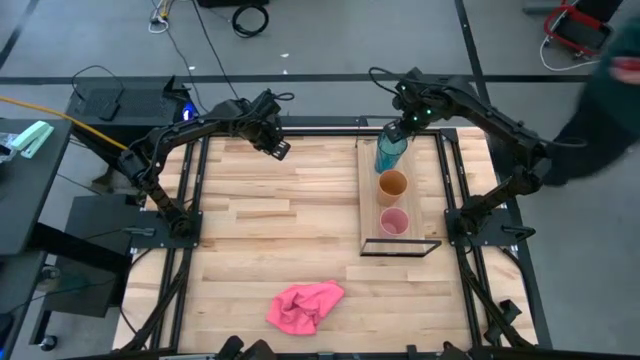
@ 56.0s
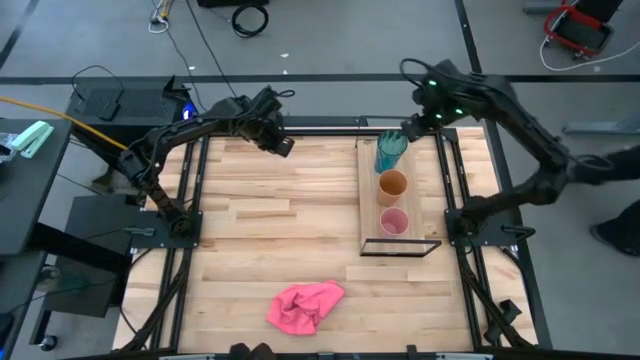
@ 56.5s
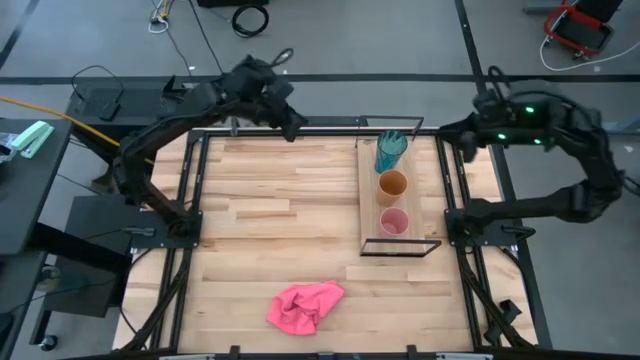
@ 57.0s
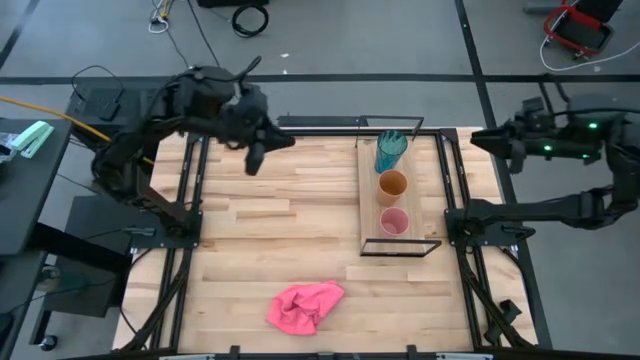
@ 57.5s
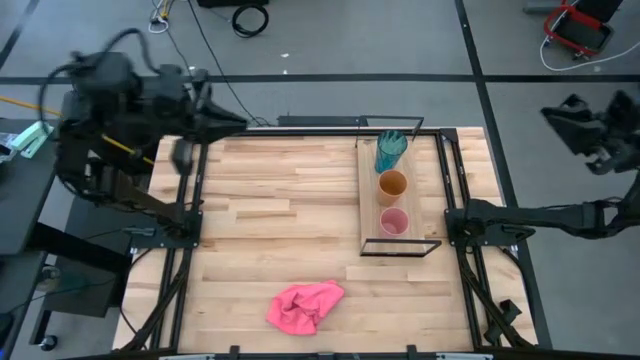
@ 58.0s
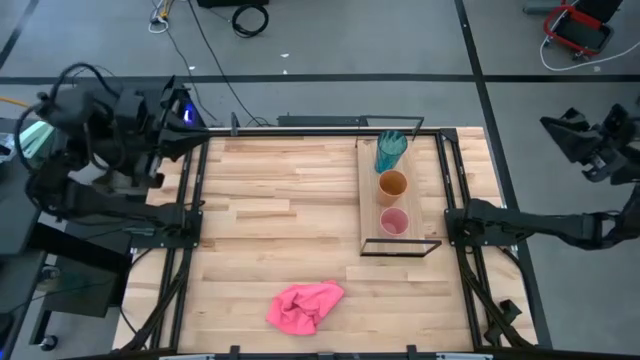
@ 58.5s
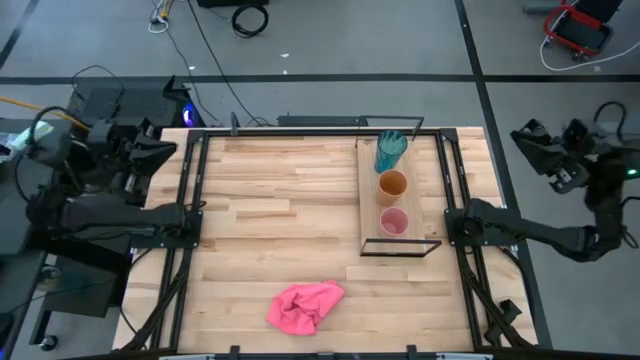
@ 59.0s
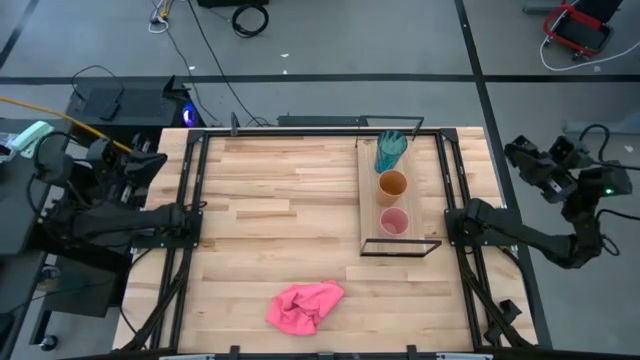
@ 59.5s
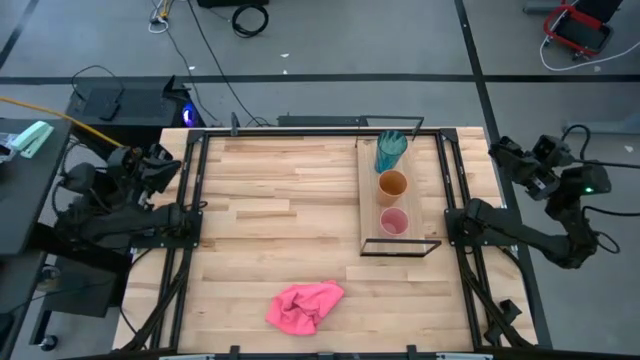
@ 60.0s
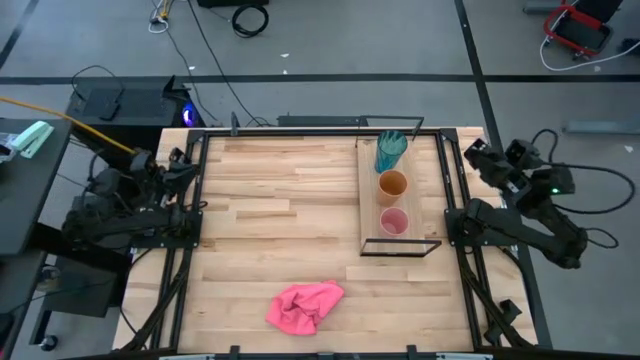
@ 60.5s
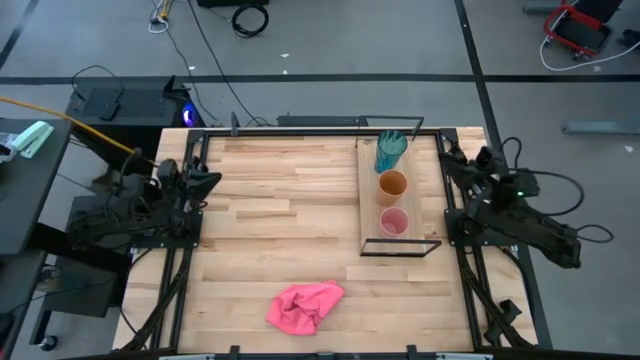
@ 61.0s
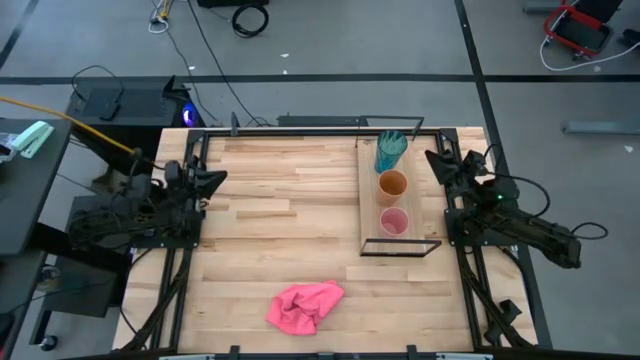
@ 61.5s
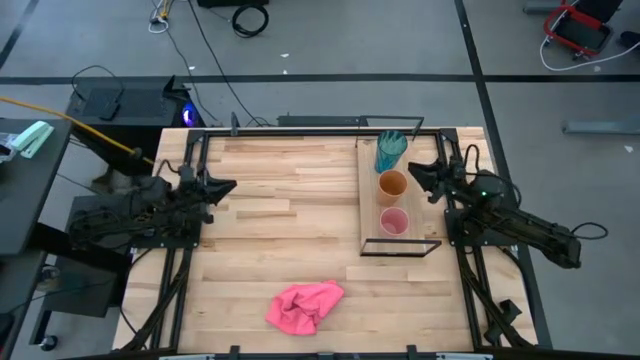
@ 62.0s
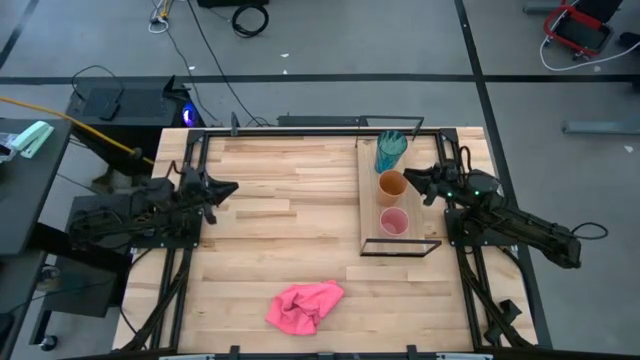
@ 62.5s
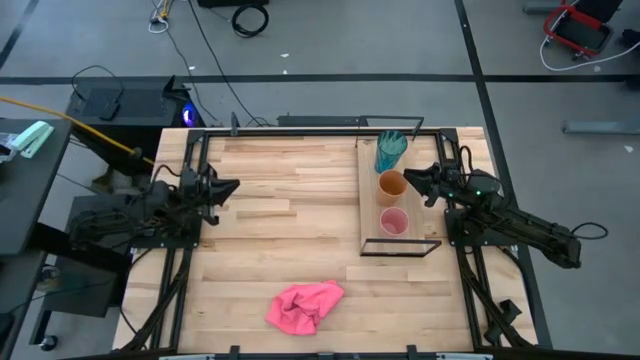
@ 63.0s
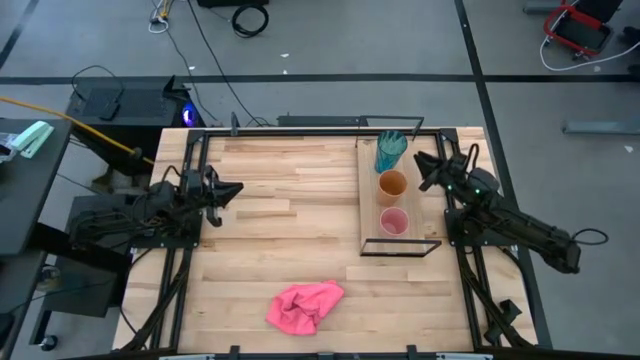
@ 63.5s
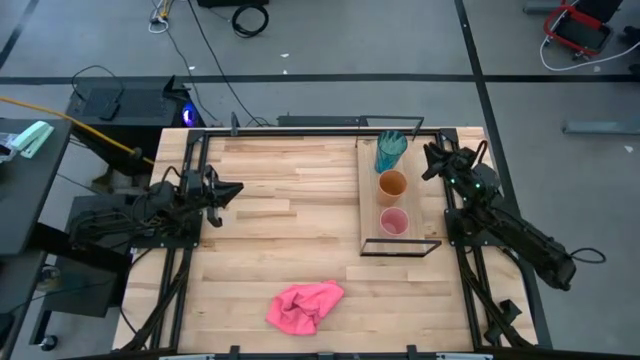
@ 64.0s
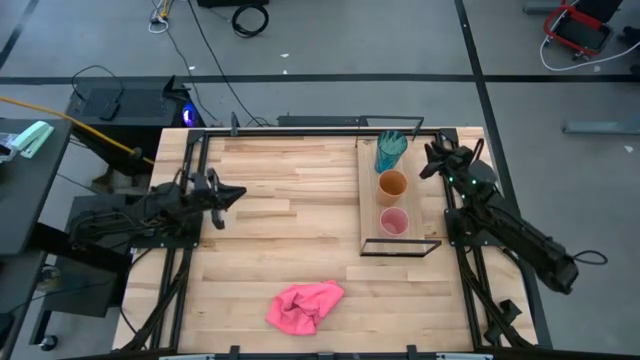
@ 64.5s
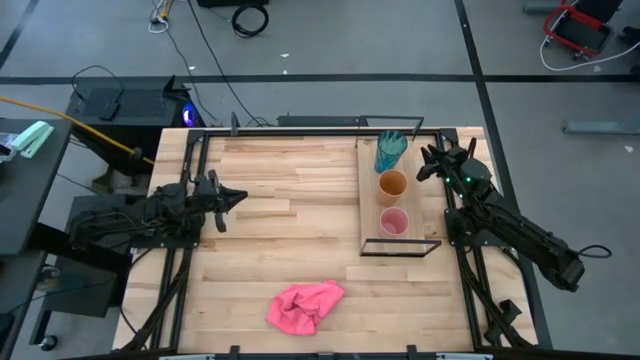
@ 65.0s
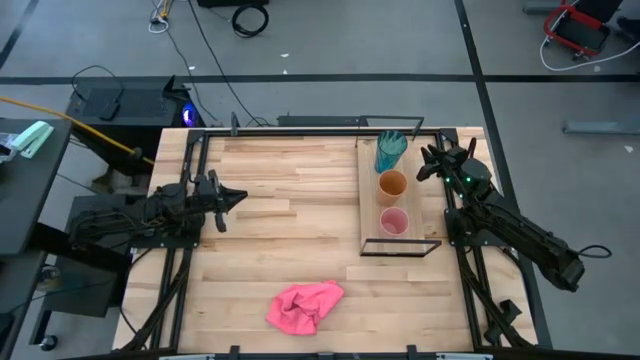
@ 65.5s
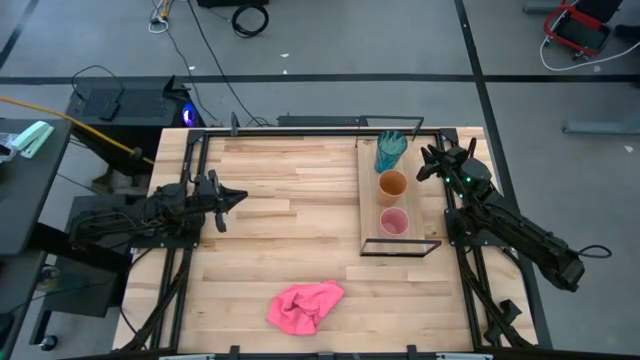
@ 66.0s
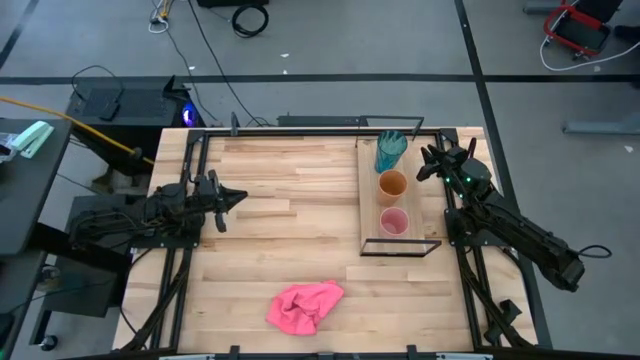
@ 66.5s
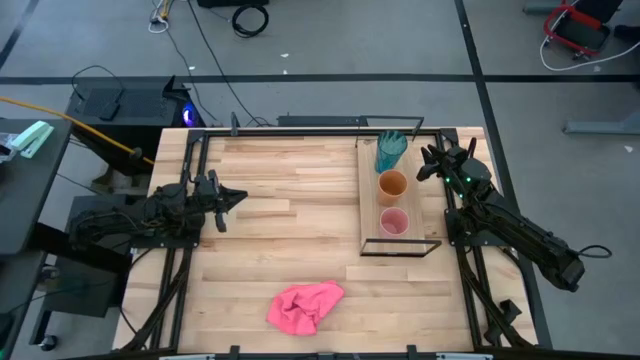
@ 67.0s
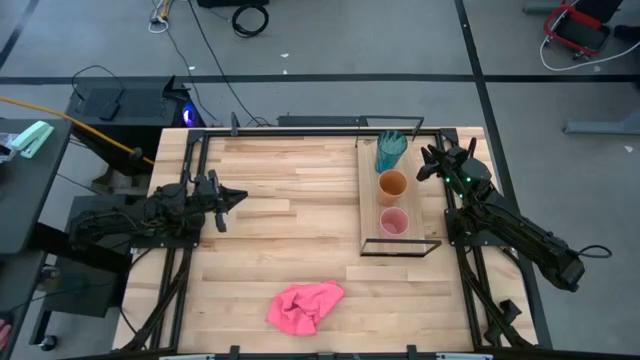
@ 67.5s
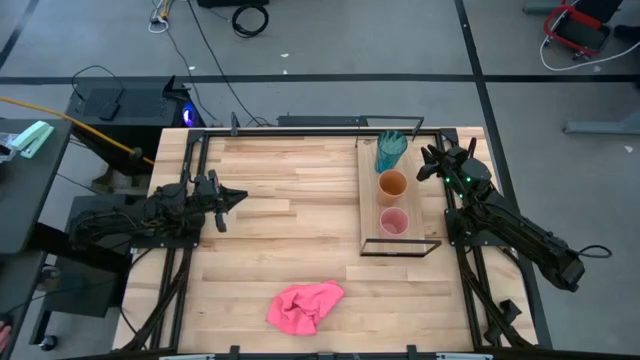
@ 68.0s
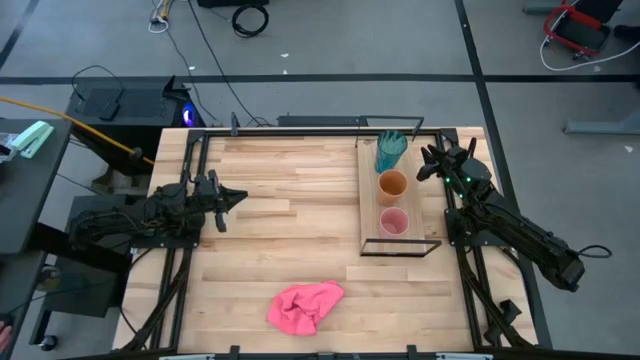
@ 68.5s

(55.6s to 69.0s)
Task: Stack small to large cups/mugs on shelf
Return to Home Position

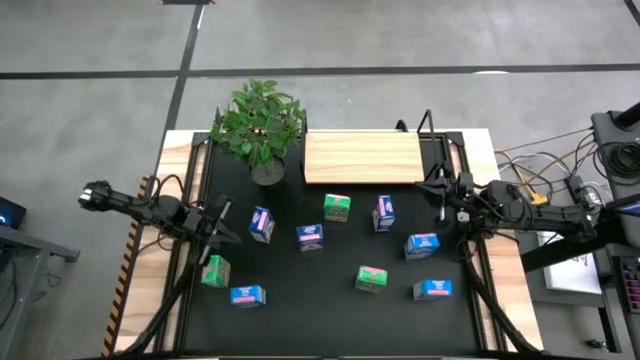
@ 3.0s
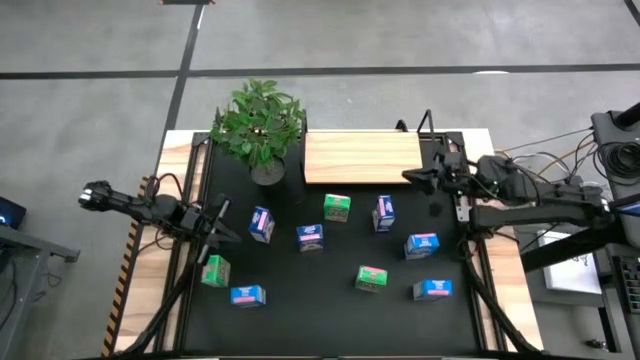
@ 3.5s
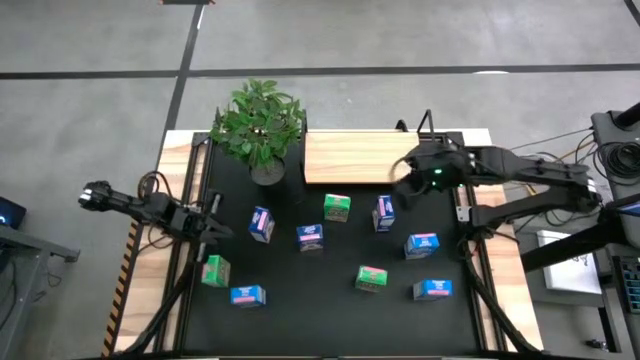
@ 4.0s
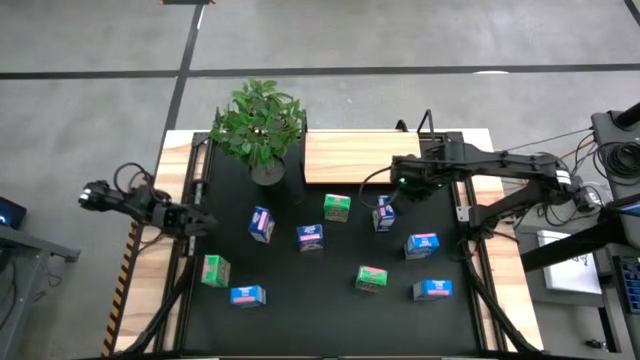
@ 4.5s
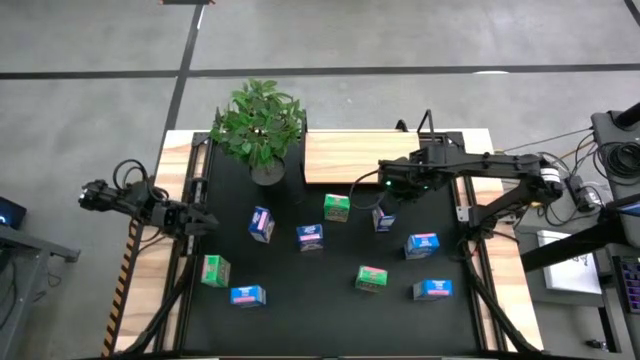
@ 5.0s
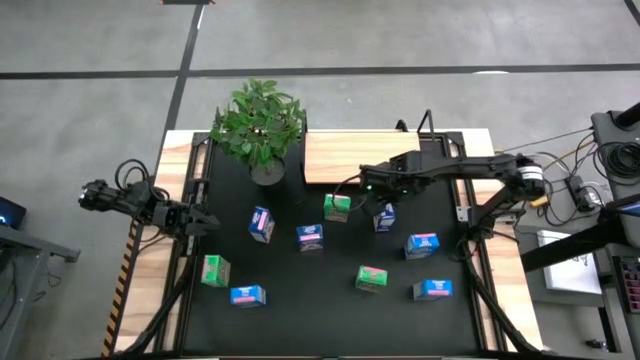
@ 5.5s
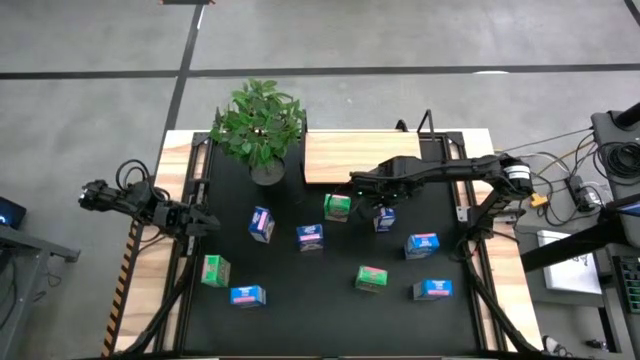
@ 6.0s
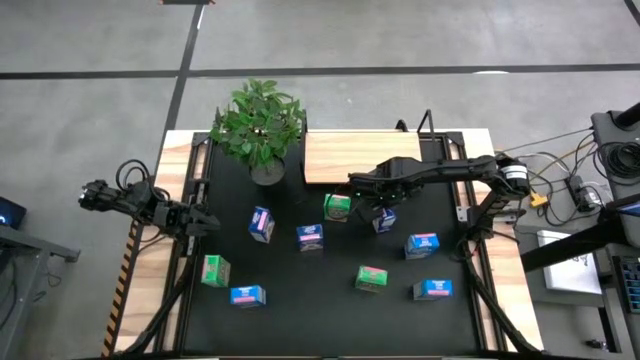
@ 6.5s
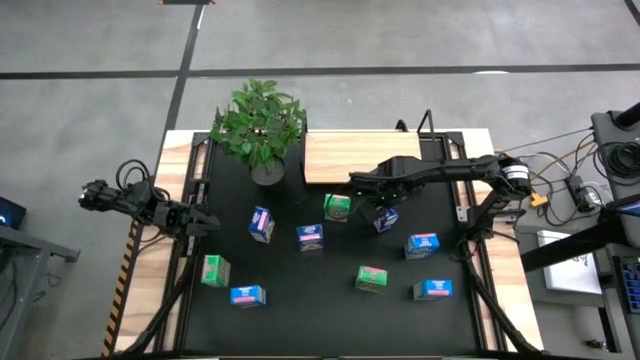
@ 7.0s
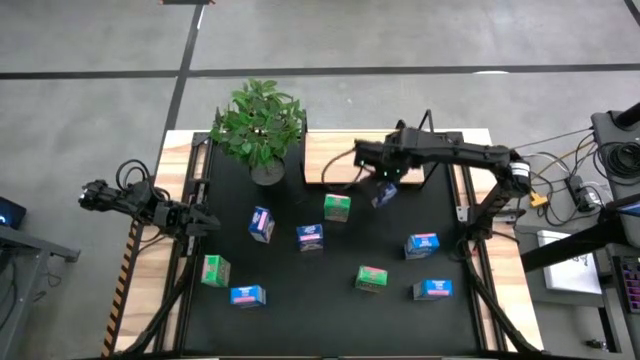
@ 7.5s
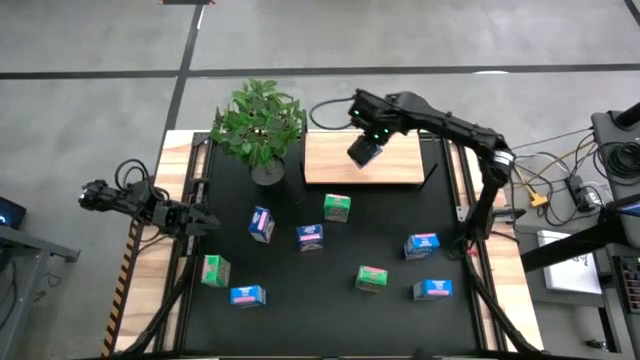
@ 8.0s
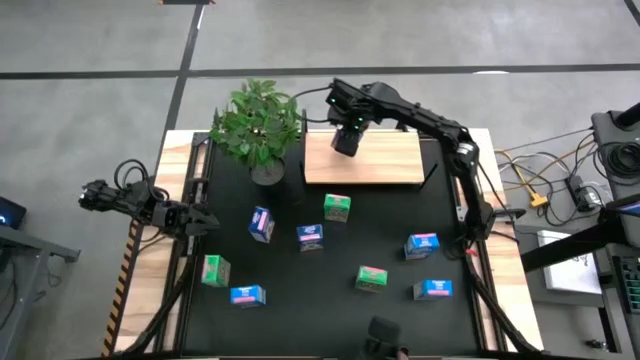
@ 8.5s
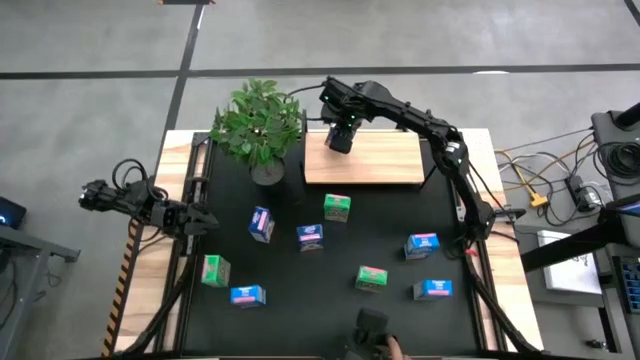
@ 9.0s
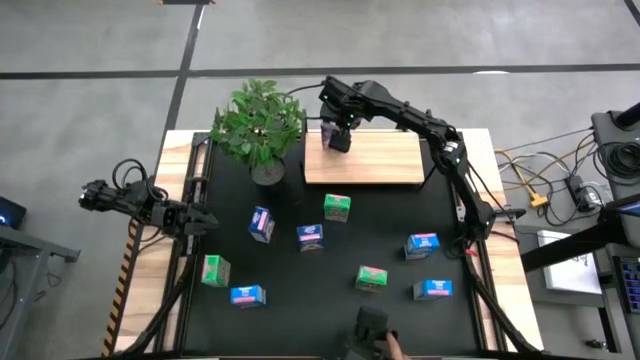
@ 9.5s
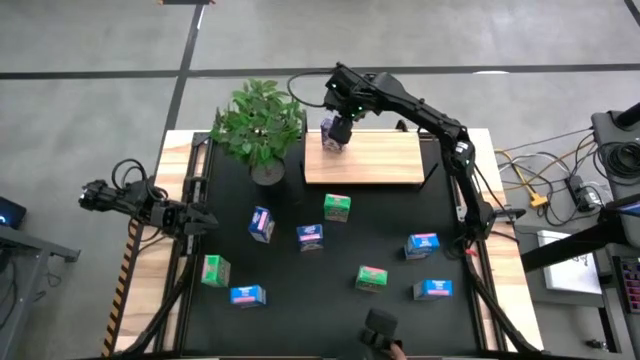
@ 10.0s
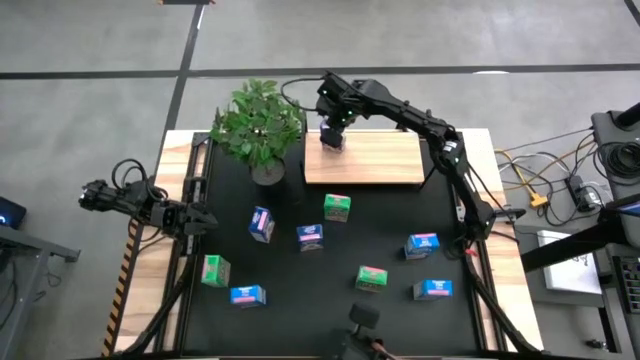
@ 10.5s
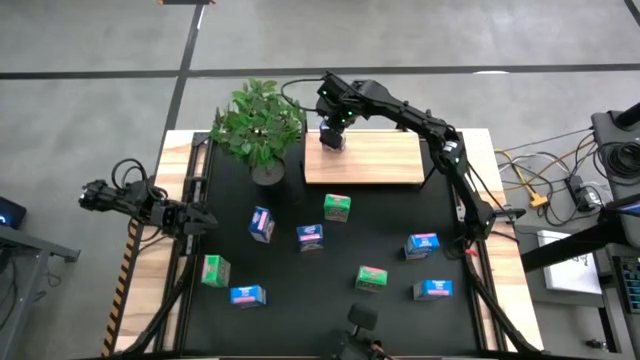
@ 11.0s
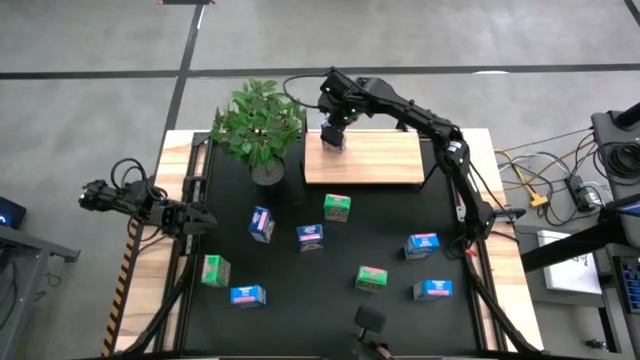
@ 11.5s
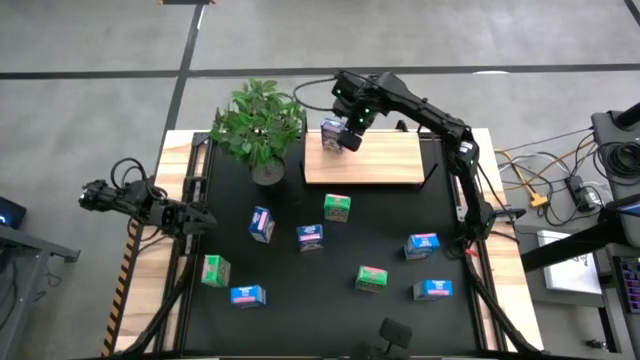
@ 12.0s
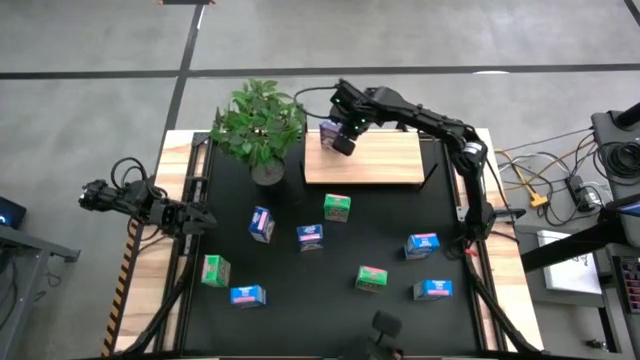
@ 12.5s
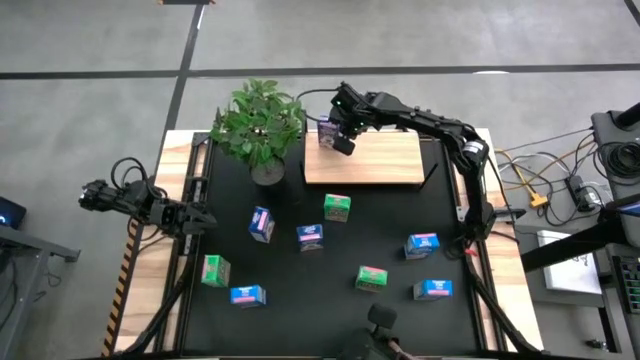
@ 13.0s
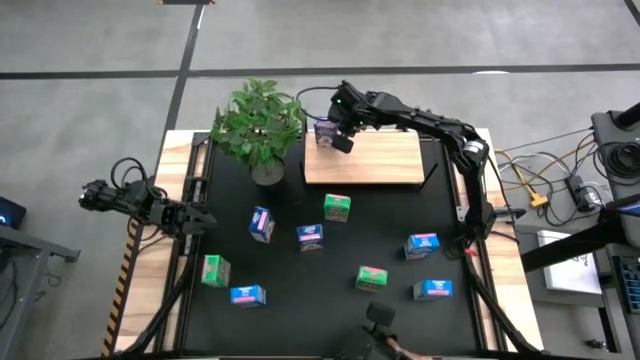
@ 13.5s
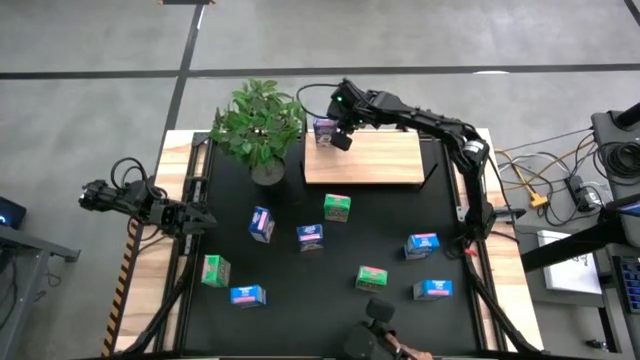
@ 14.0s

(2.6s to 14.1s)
Task: Stack cereal on shelf
Put the right dark blue cereal box on the shelf
